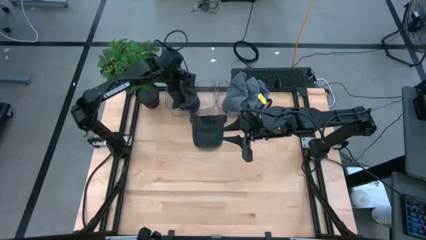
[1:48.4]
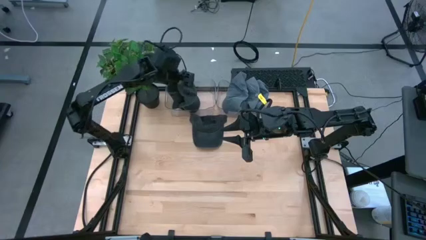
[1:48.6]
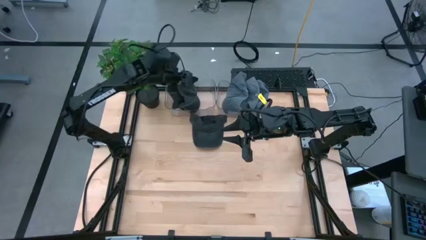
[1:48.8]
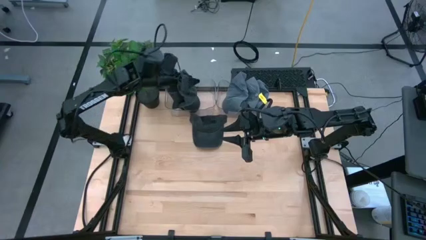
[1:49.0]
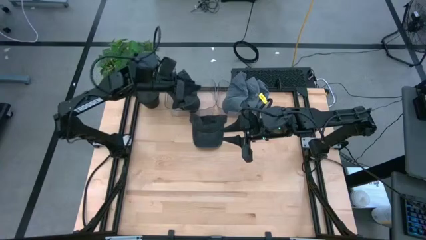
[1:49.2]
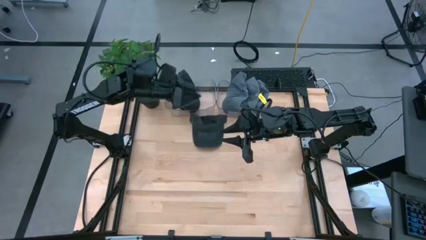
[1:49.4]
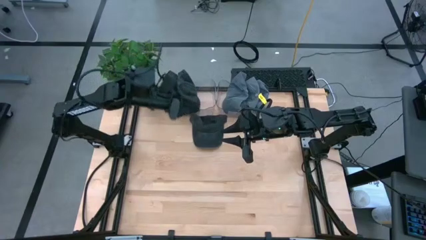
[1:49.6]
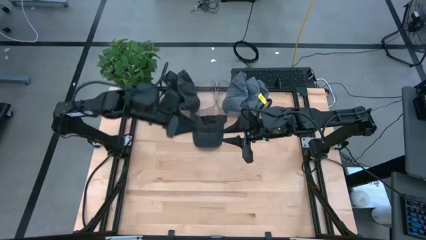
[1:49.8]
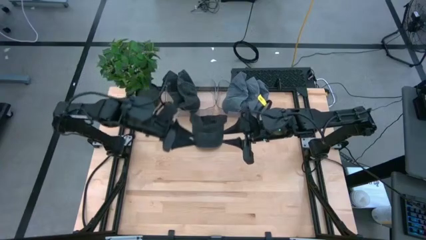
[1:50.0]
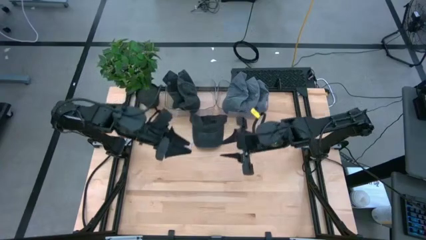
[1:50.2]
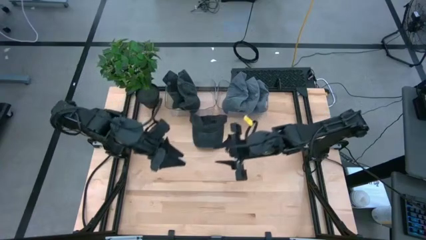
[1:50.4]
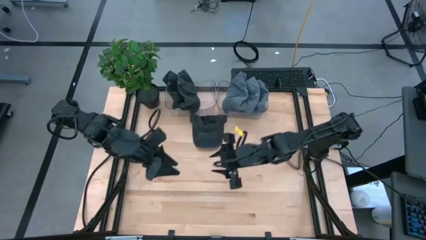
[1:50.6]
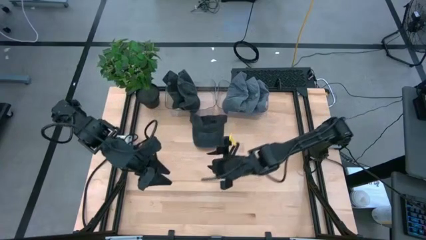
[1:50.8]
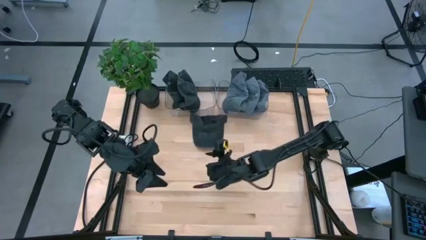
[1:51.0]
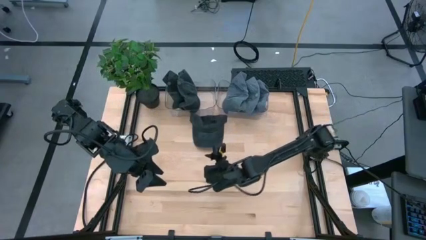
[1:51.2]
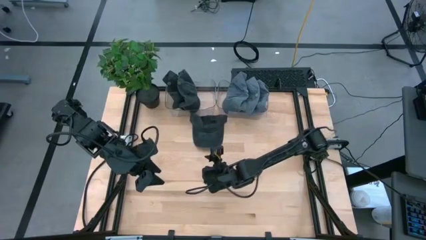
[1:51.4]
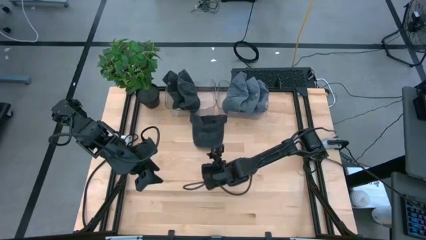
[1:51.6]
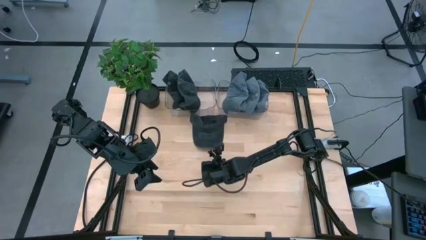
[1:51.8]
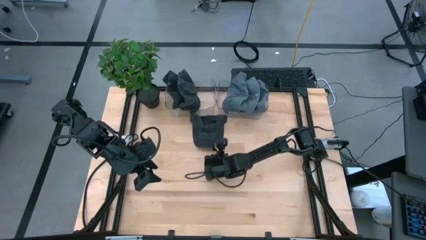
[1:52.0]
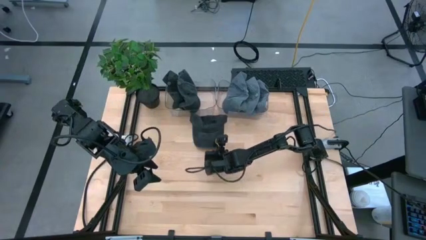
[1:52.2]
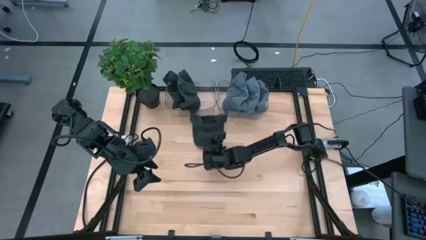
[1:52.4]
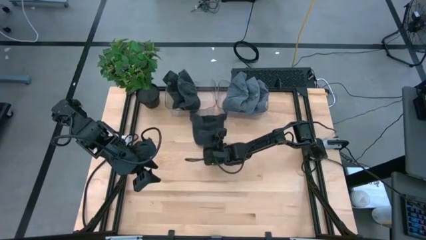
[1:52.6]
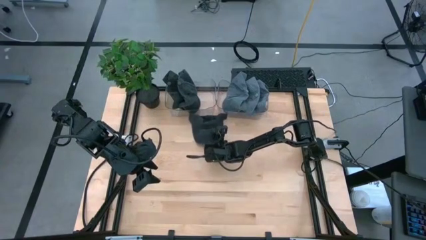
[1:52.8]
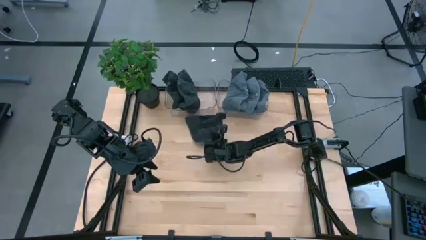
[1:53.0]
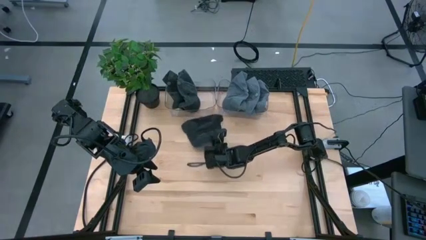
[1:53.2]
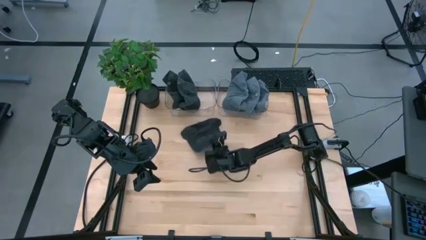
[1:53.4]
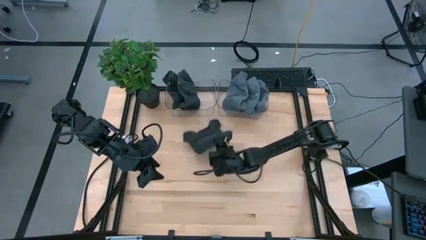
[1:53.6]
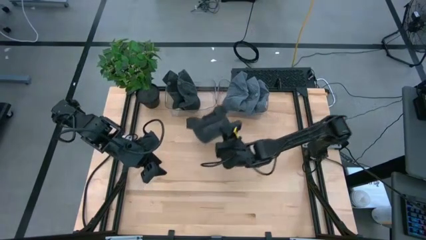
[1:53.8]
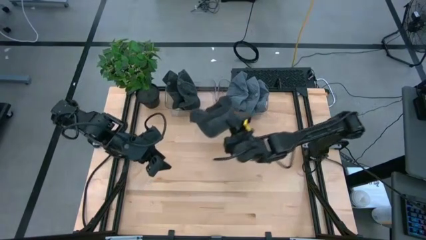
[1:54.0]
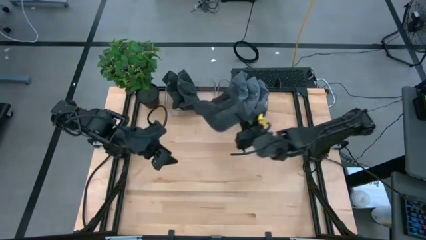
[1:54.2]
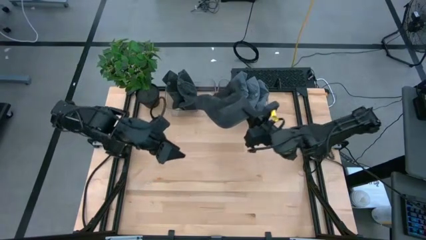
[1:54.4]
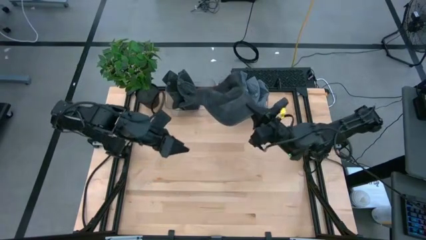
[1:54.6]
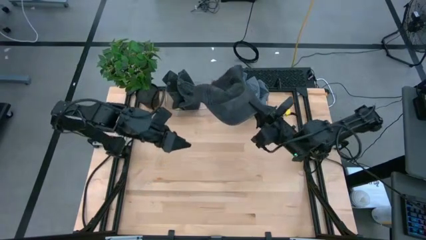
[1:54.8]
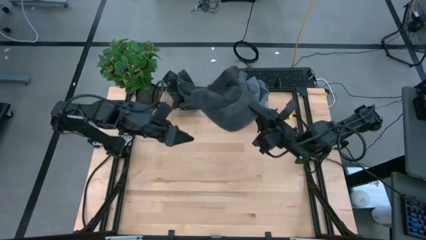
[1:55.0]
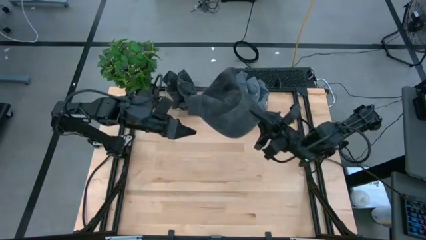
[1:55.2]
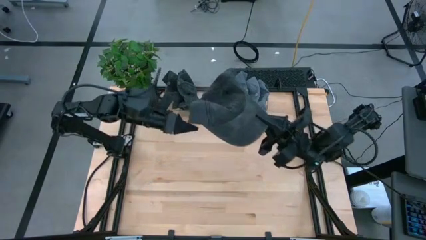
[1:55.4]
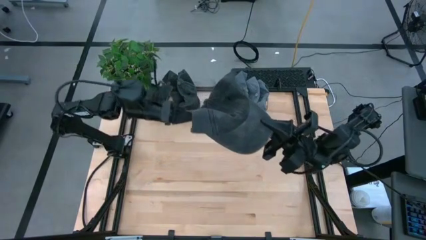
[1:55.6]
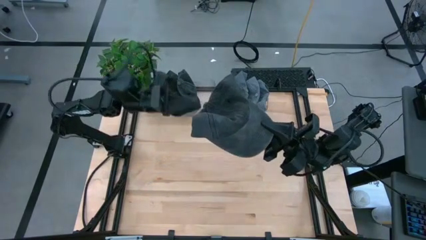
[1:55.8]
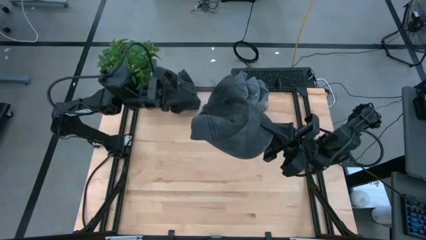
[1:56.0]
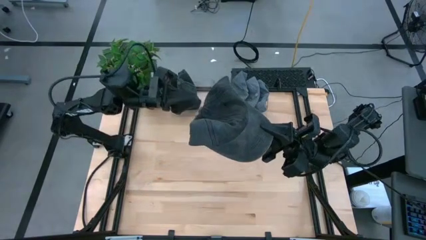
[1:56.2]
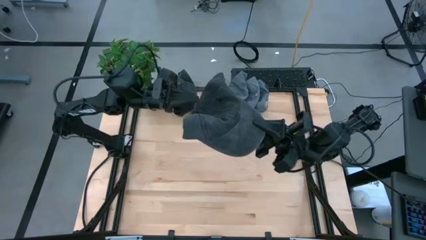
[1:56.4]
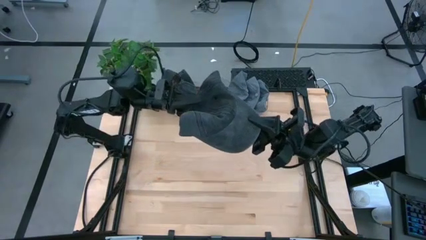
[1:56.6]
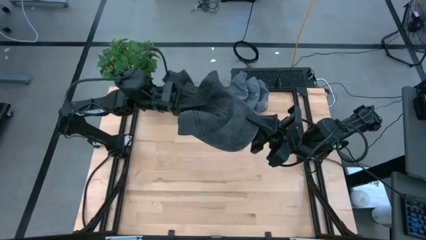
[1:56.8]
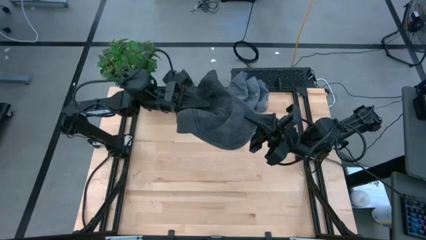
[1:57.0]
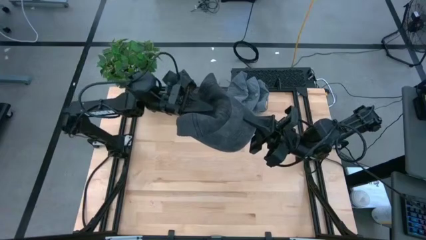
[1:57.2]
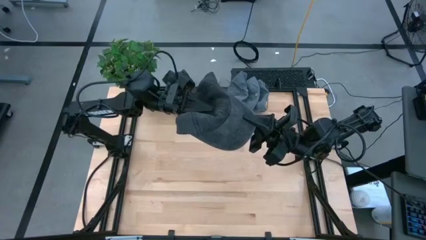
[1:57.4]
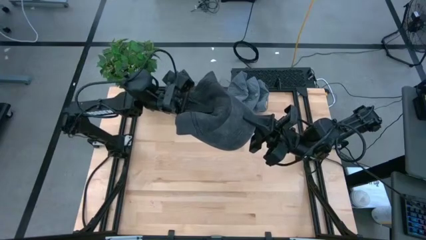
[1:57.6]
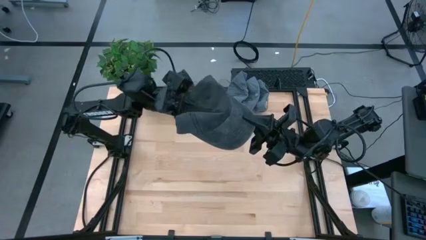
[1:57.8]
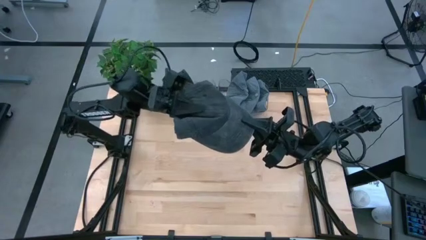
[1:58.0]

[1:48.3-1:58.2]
Task: Pick & Place hat
Put the black cap into the left transparent bin

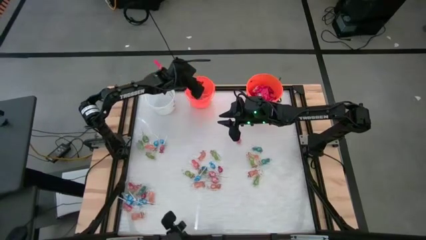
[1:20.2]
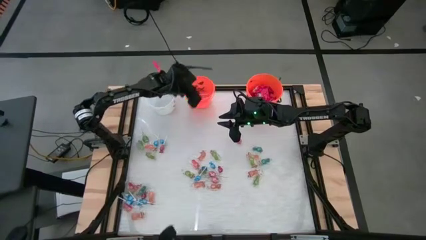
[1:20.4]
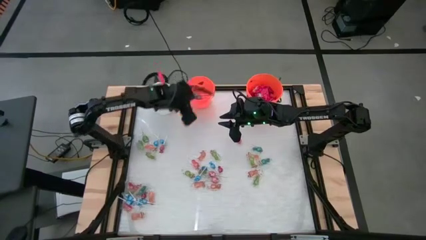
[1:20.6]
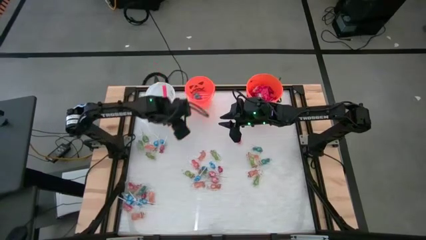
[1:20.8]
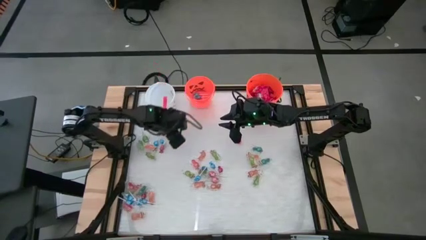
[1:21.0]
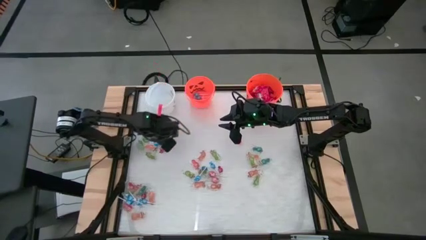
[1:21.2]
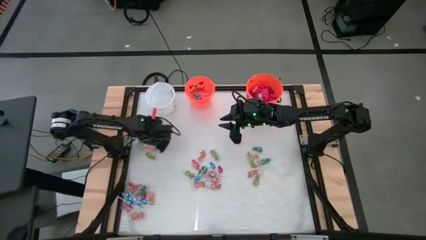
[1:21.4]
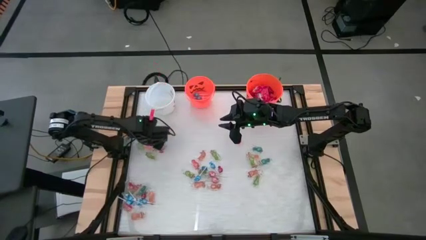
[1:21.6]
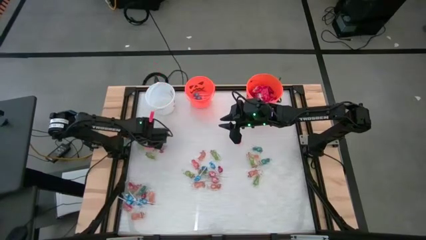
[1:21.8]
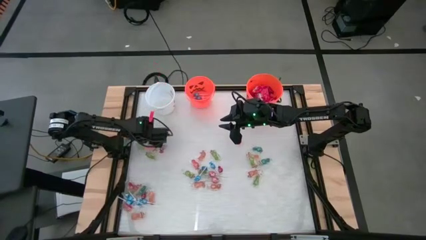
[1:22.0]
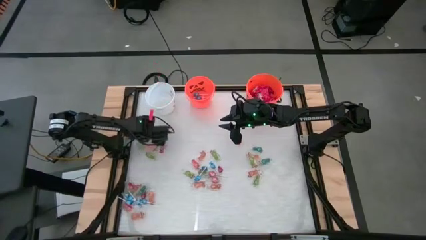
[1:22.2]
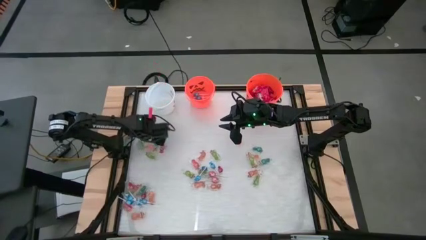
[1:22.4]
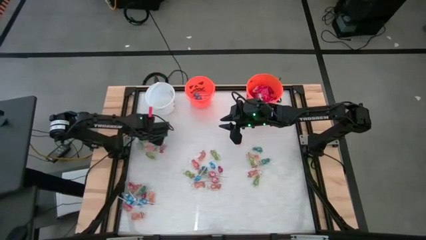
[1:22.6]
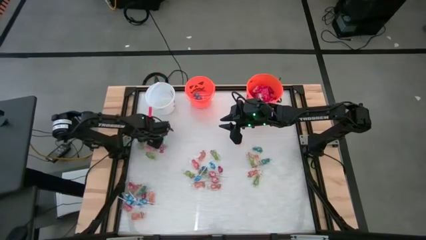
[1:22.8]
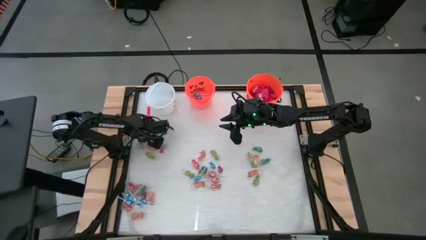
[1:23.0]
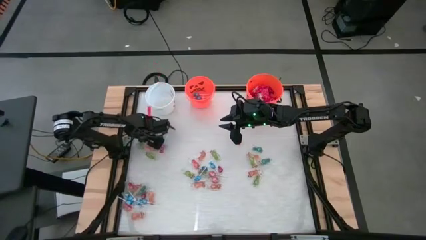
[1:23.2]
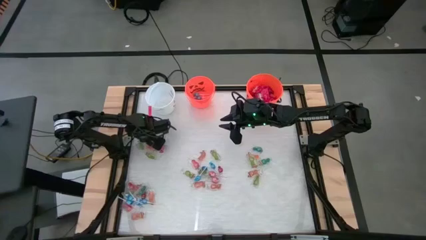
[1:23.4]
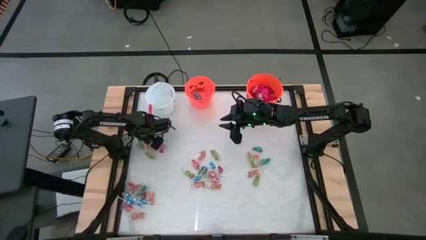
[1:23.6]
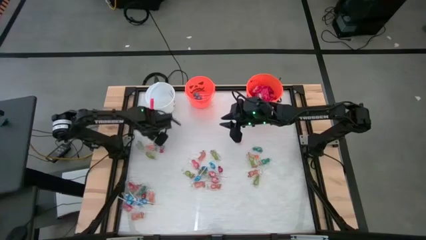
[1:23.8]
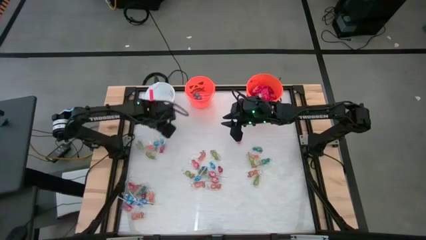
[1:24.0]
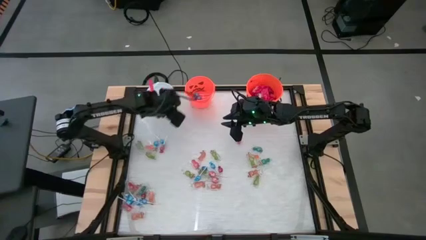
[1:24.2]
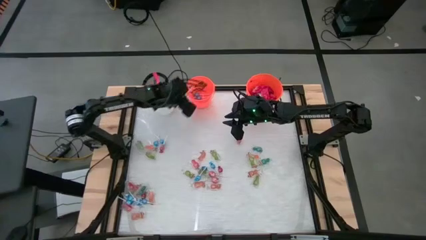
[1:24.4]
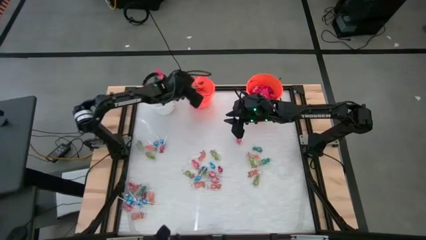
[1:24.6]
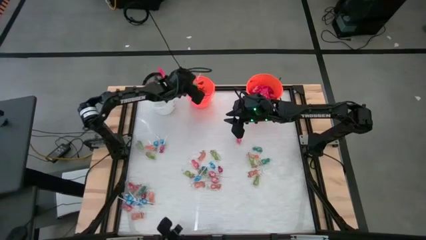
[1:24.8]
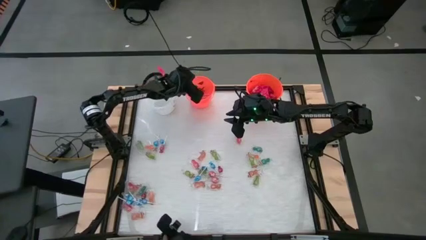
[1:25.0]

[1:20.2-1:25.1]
Task: Sort candy by brand, put in halloween buckets
Put the green lollipop into the left orange bucket

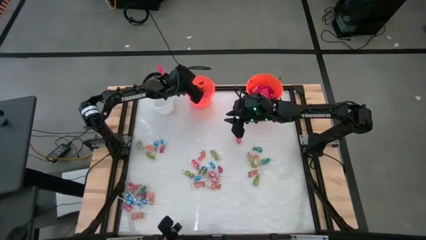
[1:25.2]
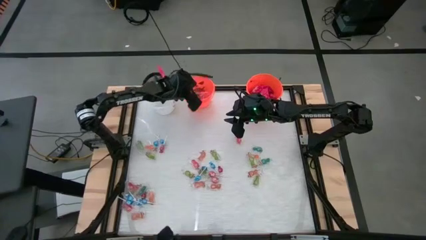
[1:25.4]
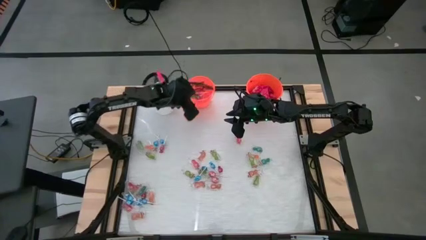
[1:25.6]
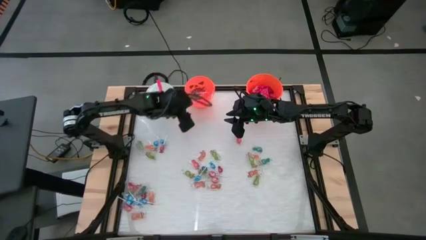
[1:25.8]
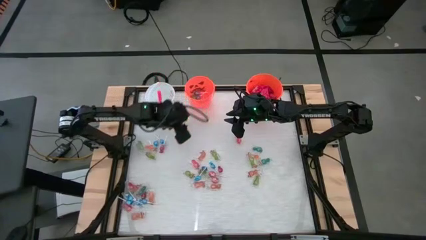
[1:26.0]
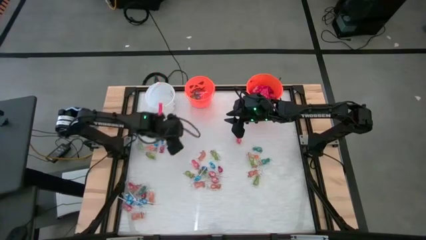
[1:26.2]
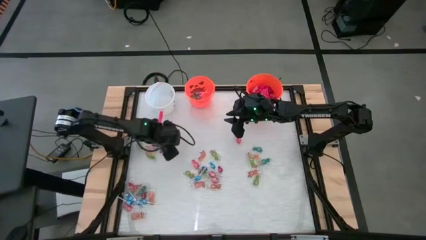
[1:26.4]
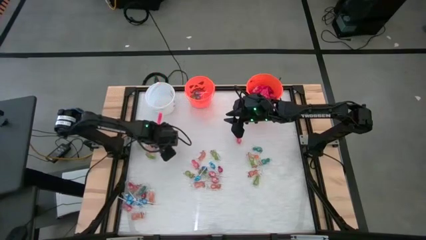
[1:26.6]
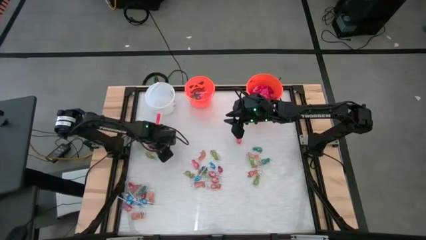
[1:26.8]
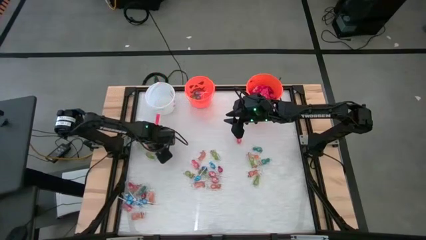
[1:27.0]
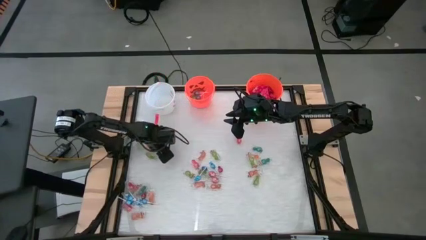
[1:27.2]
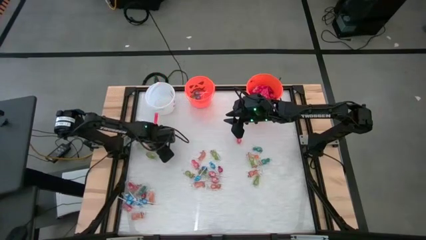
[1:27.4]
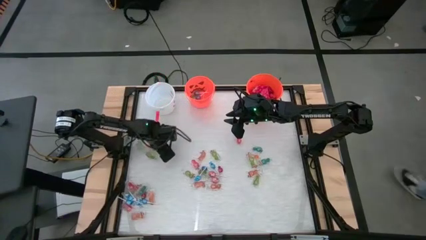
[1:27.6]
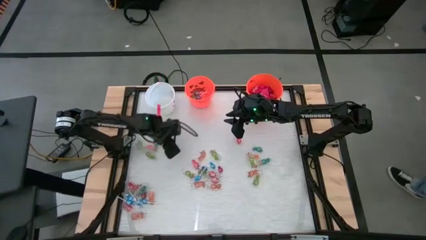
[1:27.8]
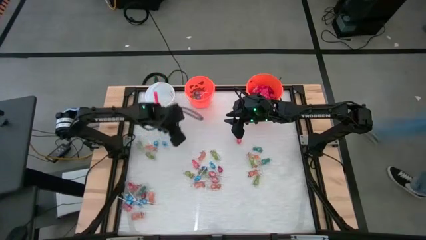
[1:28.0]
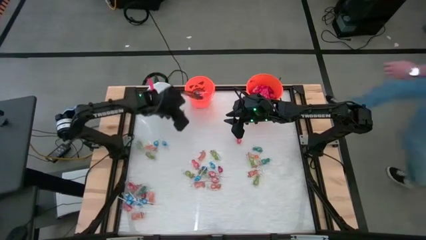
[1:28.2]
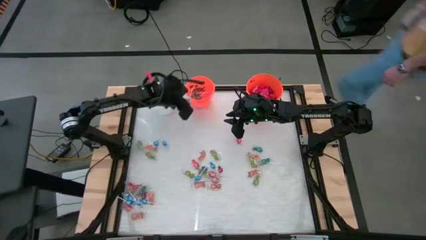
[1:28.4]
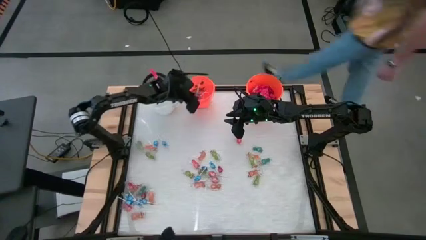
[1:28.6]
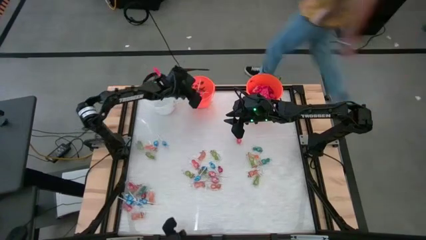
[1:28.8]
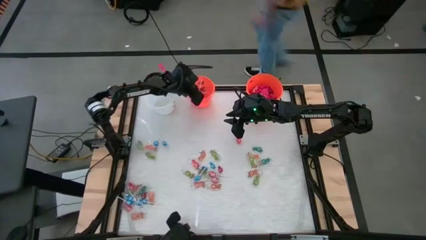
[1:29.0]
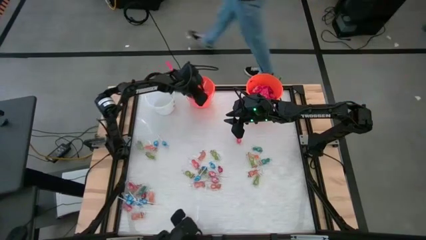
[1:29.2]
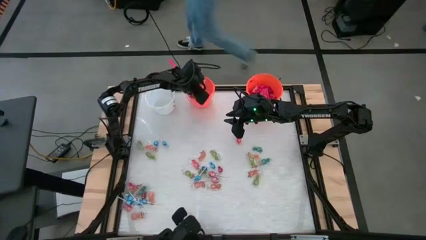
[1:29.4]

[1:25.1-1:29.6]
Put the red lollipop into the left orange bucket
